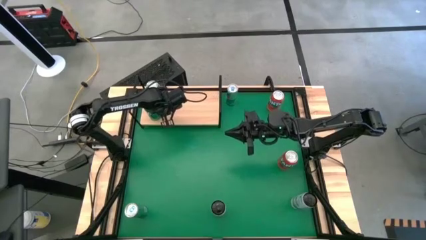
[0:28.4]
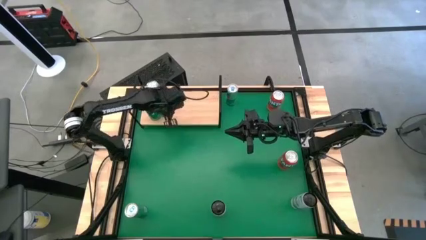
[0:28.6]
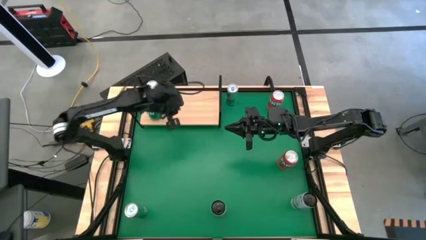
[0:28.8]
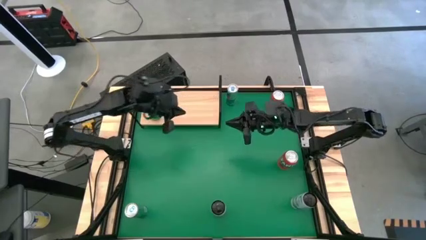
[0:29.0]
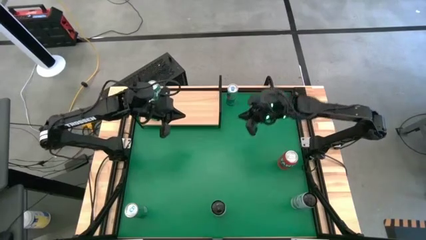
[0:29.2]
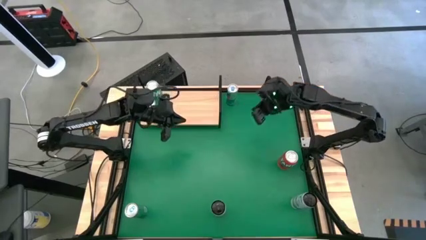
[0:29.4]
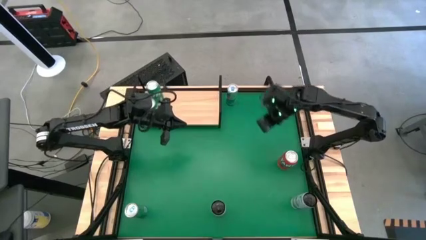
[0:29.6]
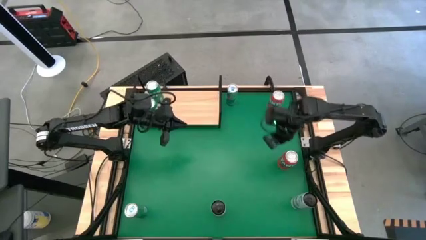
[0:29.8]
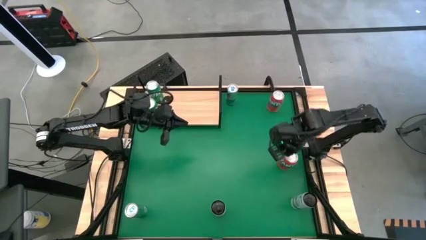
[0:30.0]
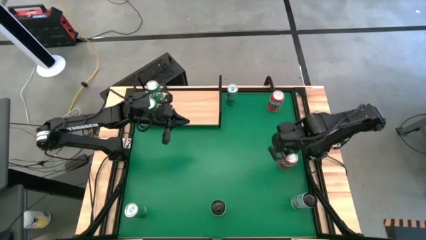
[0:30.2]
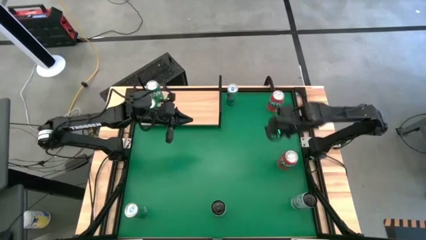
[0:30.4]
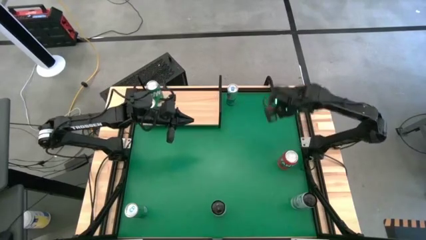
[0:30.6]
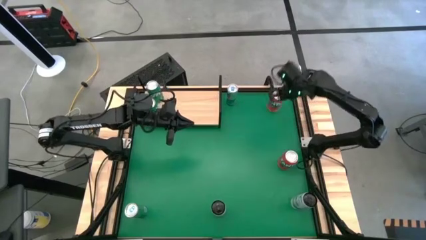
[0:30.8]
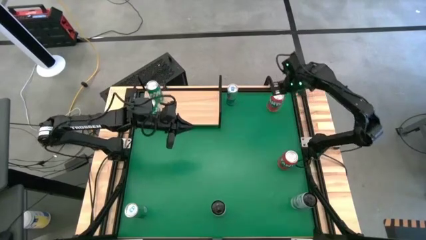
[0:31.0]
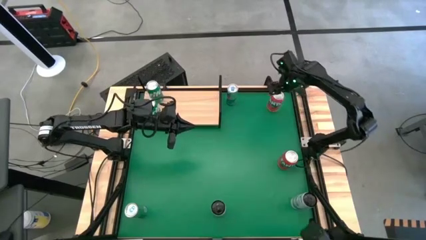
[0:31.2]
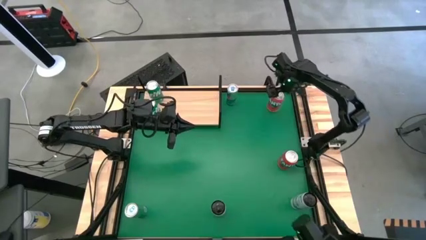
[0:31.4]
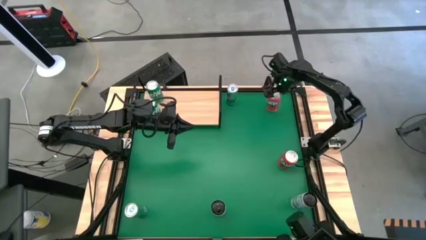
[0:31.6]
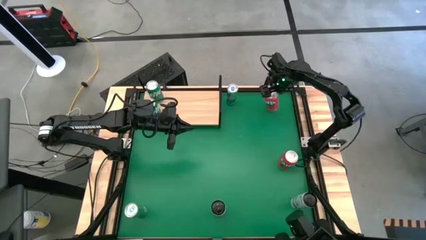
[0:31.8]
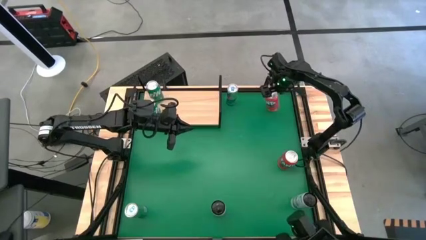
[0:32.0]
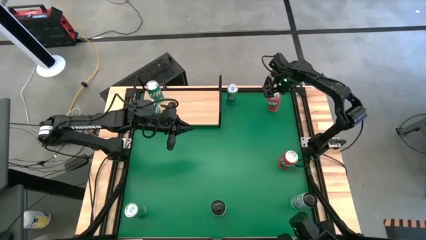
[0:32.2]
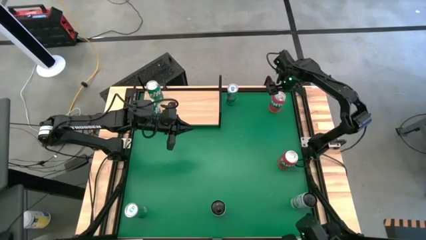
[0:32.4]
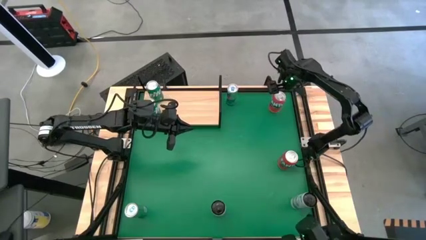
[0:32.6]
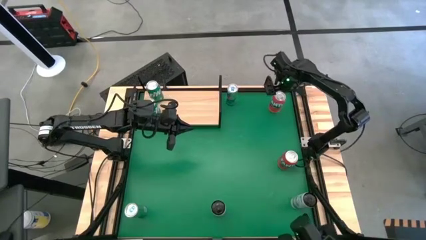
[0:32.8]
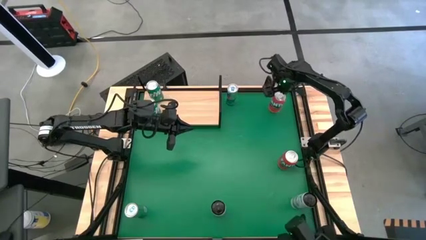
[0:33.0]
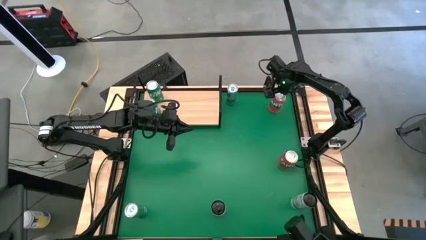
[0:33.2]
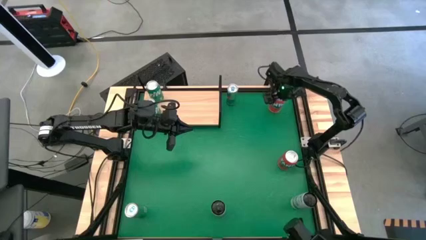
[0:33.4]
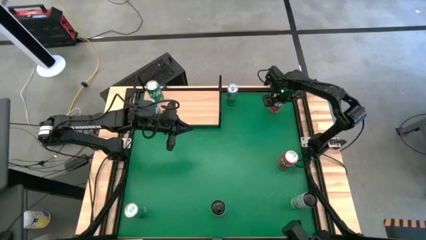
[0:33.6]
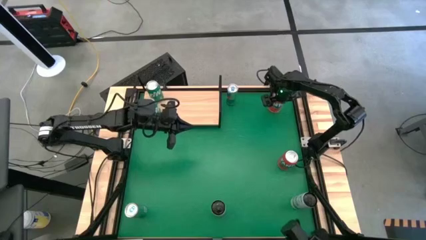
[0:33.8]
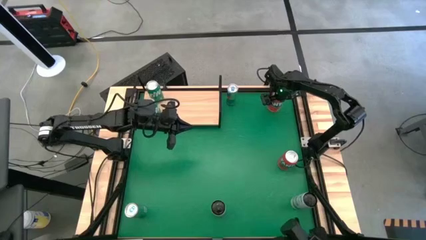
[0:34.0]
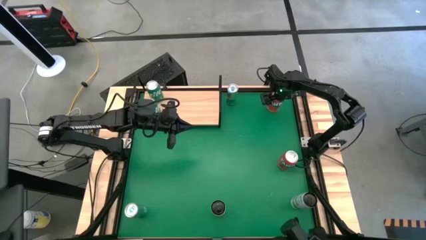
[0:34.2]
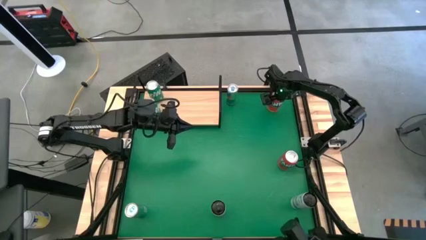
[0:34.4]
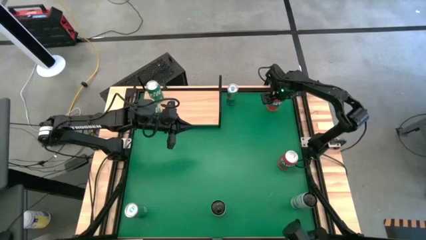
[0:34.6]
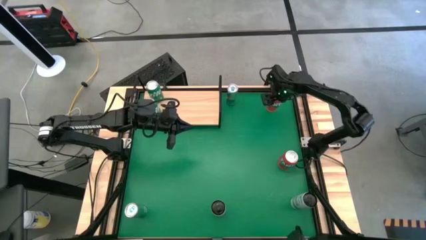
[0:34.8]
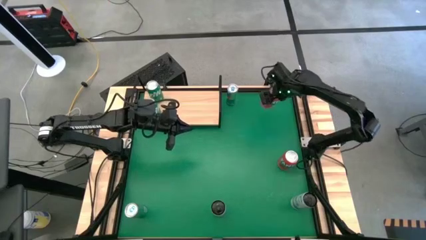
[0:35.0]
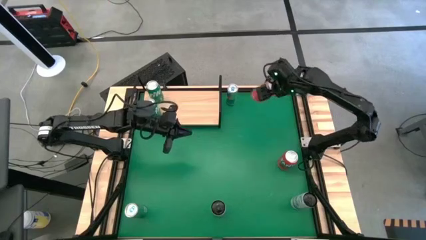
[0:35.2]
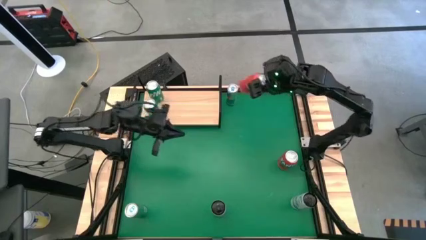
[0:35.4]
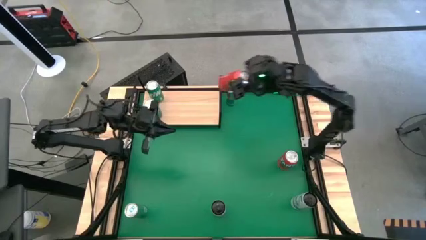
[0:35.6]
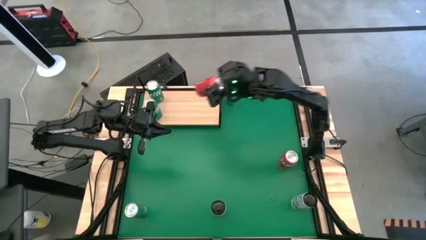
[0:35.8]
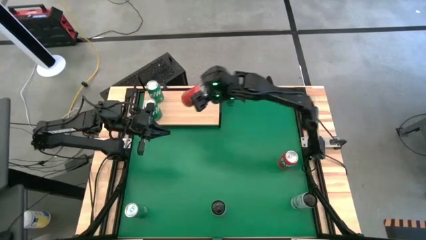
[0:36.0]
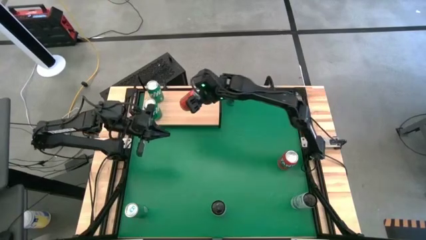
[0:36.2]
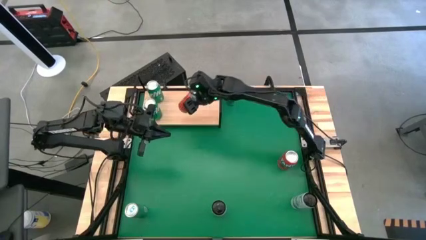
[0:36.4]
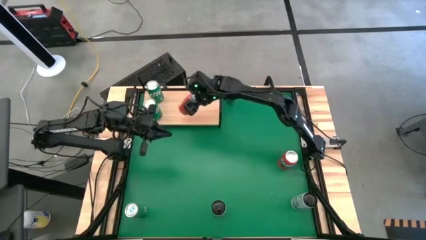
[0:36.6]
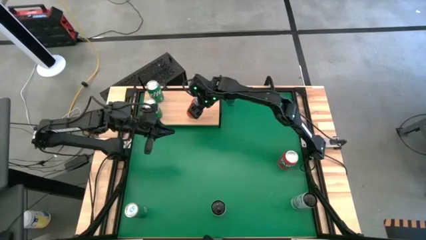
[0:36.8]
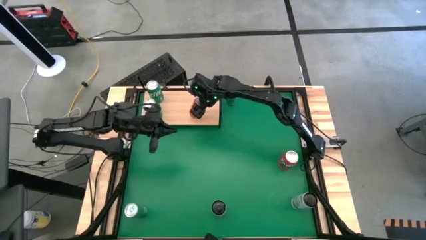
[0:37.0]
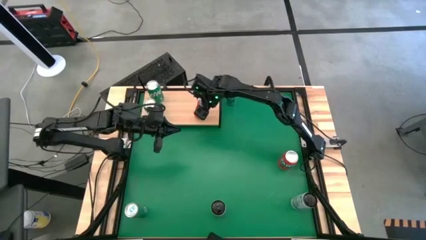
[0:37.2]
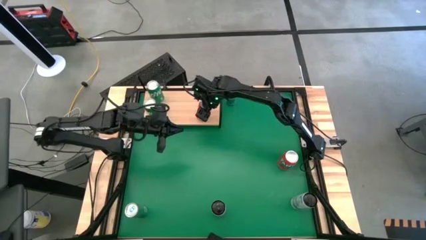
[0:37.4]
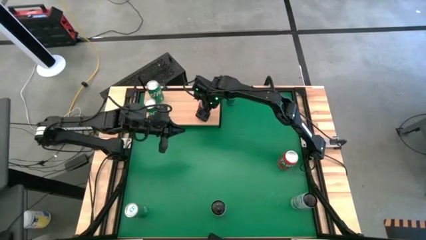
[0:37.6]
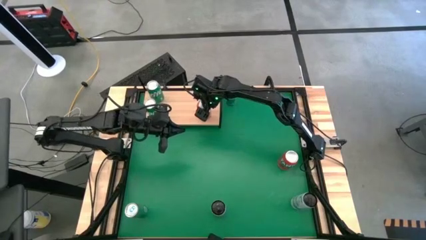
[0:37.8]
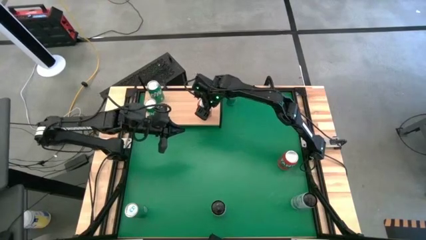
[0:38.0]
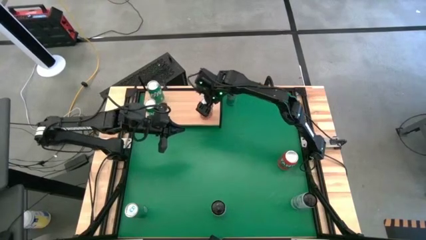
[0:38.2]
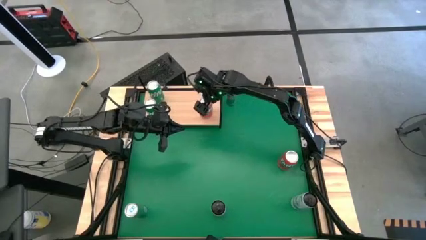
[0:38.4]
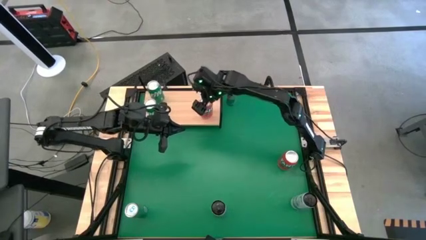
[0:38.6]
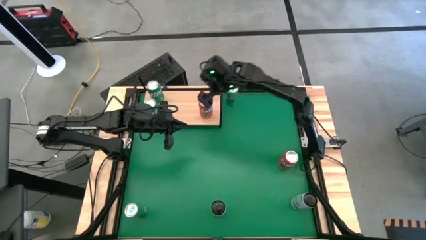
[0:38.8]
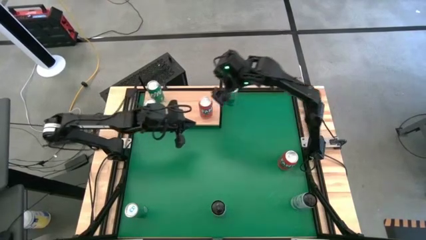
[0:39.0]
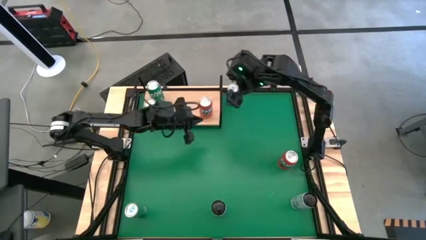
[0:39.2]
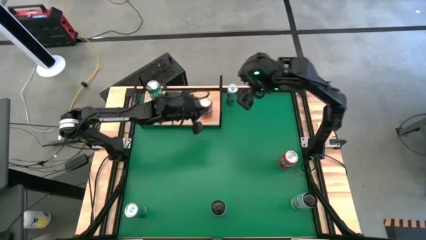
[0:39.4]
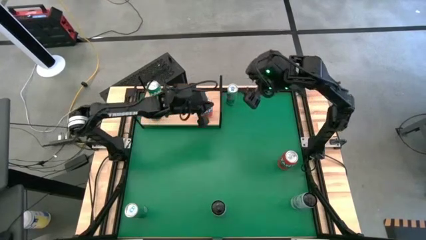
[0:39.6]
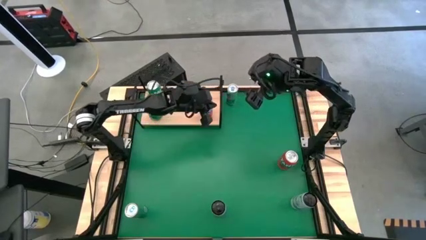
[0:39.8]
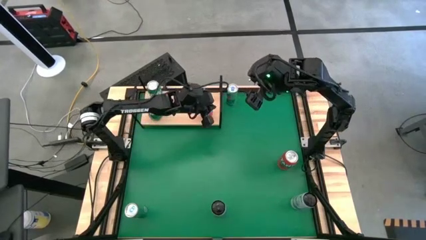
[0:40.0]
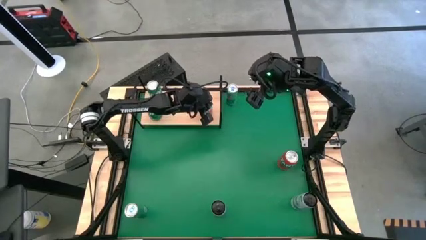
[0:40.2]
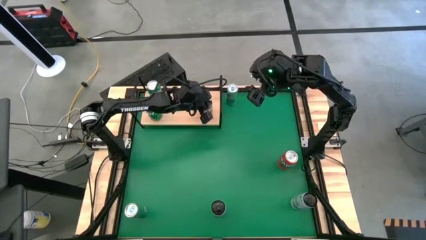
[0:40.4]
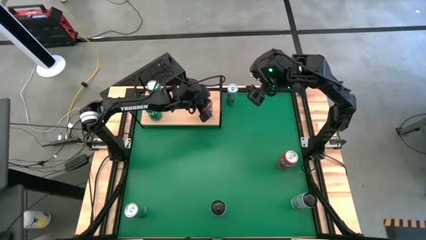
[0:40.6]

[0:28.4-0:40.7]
Task: Place canned beverage on shelf
Put the top orange soda can on the shelf
